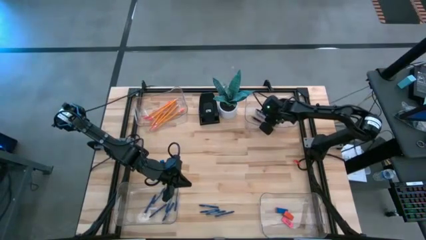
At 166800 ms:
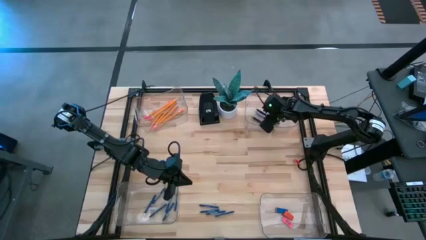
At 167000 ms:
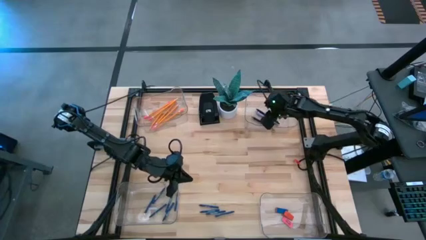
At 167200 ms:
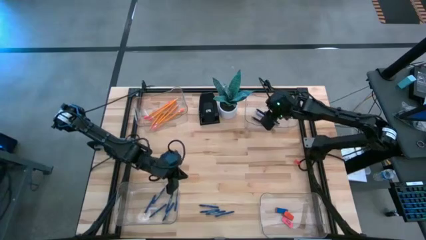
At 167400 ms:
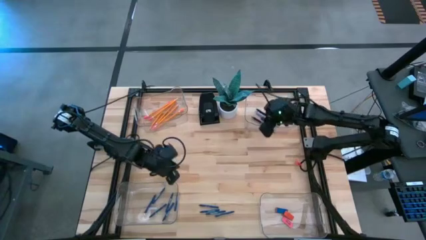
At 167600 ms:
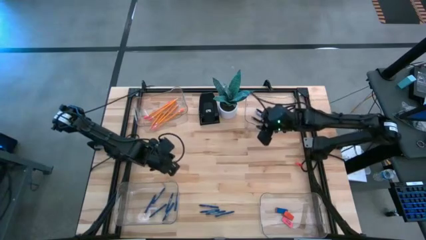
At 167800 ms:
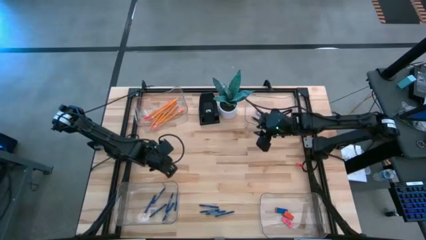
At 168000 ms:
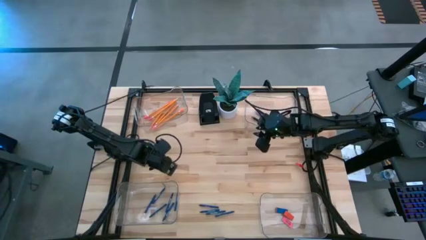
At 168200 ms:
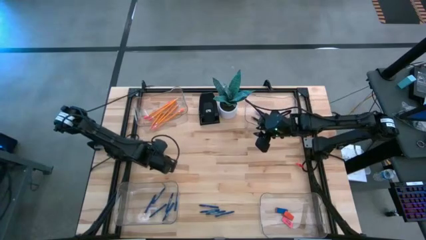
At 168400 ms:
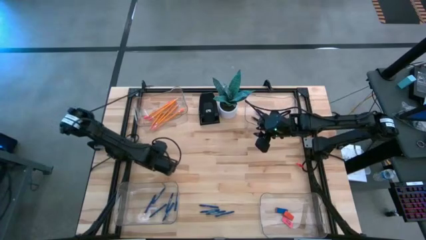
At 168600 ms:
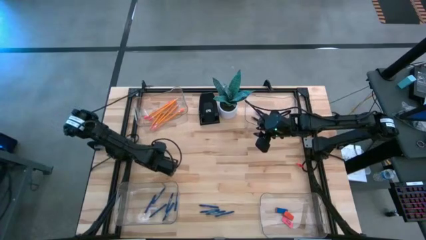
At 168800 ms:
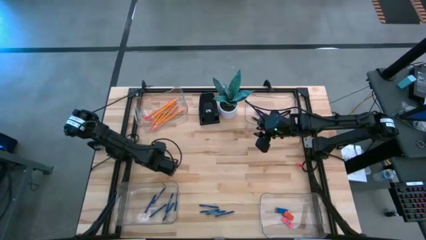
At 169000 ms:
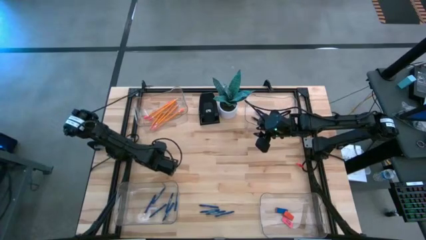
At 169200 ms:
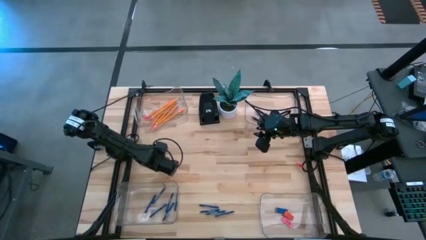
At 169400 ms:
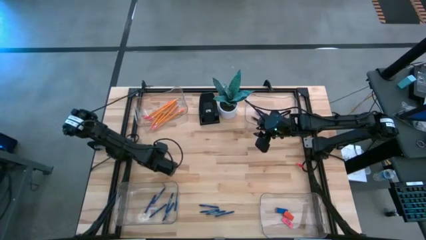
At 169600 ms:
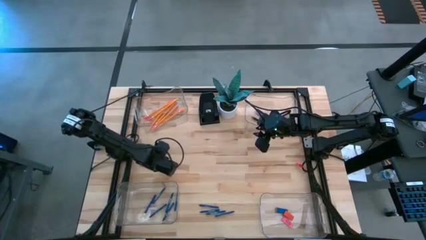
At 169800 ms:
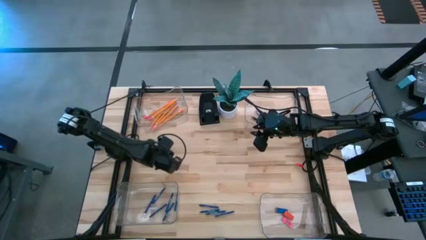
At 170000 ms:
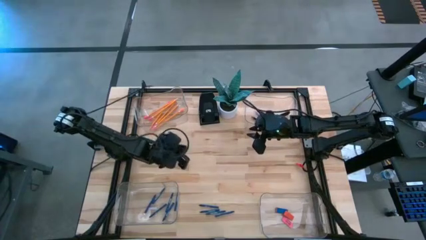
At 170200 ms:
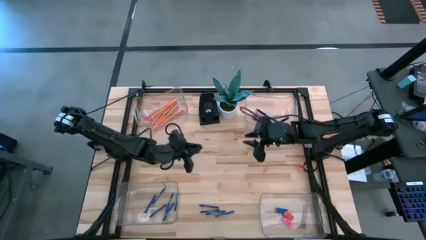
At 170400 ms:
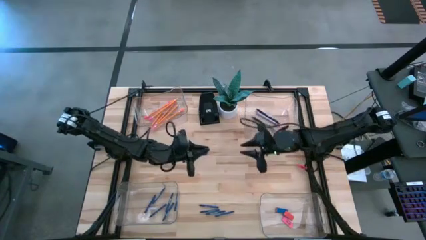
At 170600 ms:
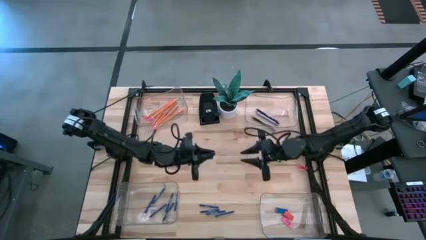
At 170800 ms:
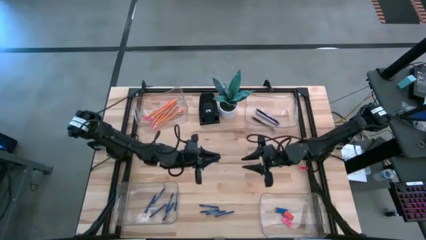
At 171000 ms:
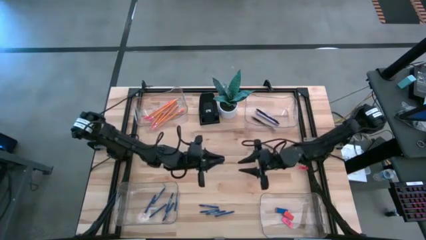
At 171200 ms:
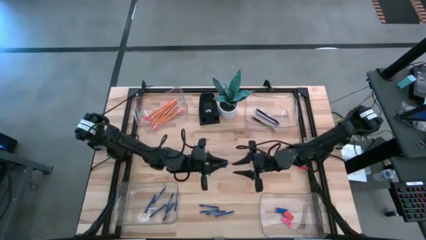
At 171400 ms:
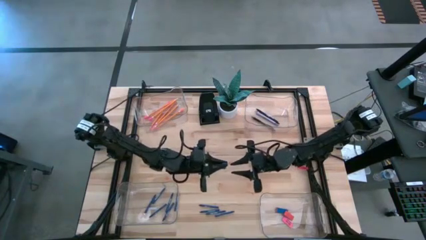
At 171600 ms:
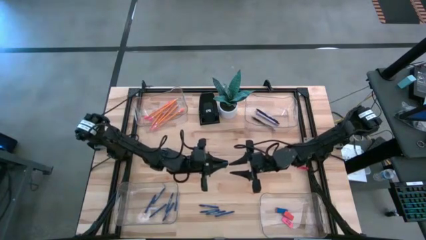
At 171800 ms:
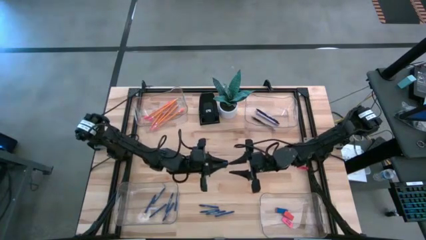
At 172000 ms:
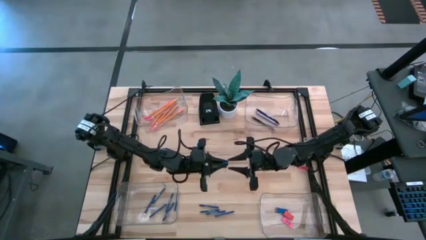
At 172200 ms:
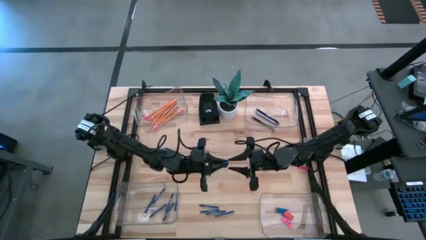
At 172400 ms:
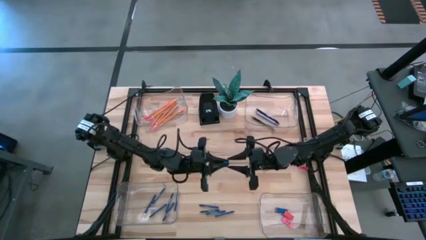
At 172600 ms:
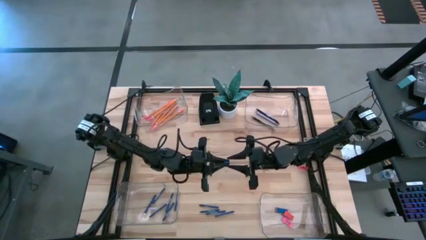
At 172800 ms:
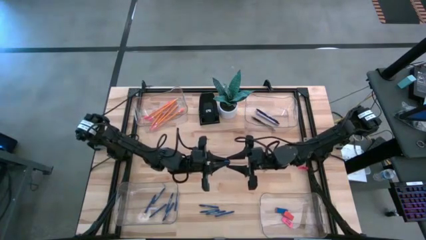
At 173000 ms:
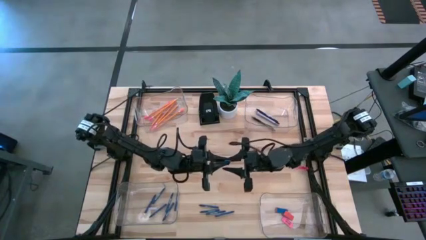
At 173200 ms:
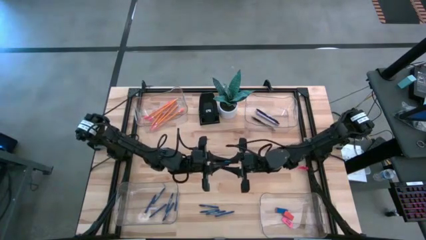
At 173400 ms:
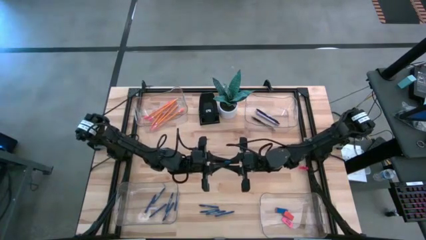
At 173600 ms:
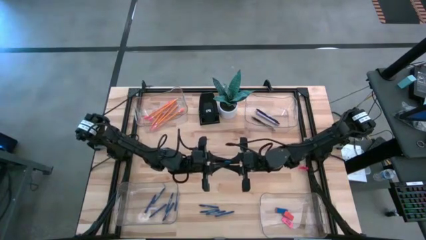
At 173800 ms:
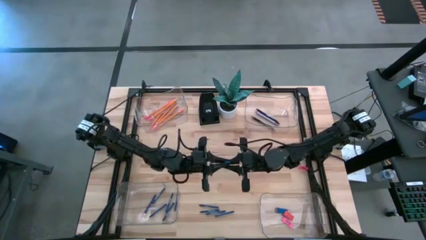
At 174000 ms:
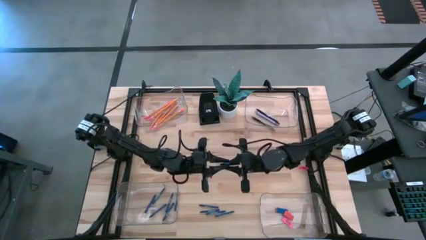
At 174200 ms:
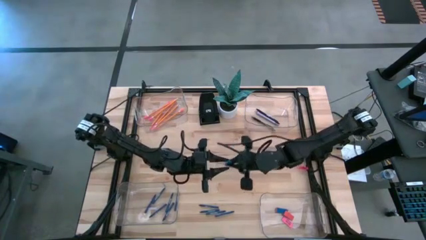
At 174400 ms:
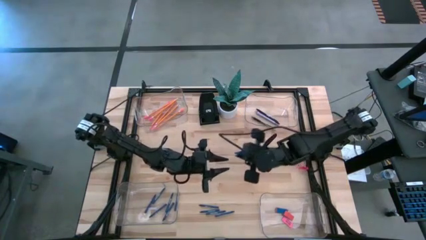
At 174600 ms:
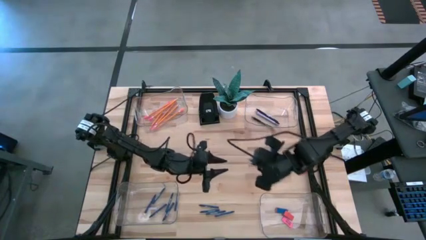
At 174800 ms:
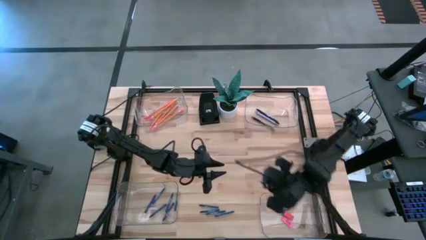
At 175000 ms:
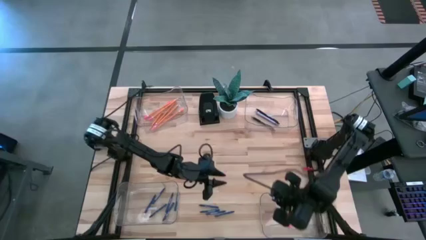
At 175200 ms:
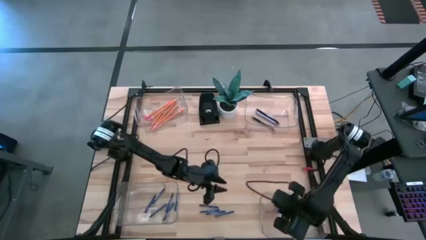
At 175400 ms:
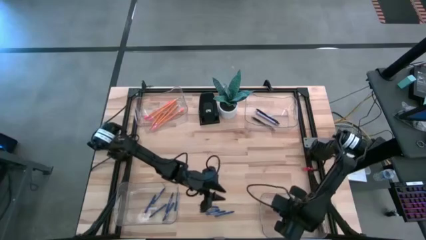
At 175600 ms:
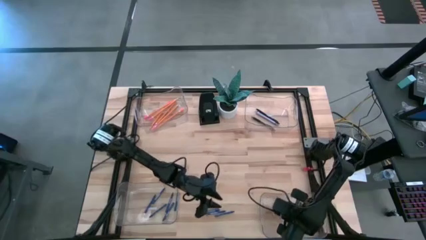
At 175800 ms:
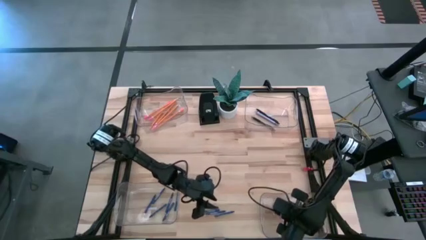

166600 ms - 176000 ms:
Task: Sort crayons/erasers/pens/pencils in bins
Put the blue eraser into the bottom right transparent bin

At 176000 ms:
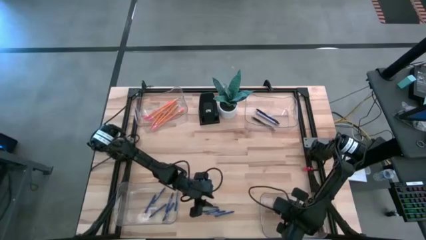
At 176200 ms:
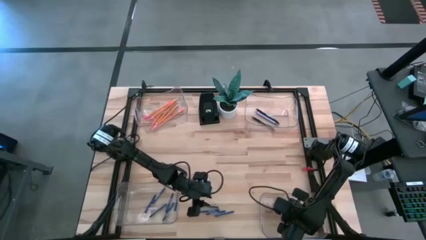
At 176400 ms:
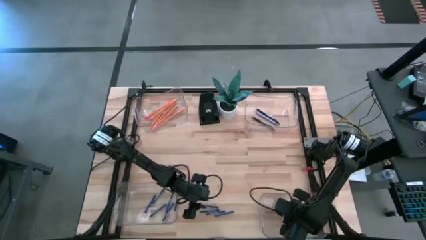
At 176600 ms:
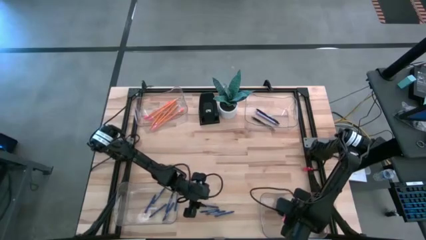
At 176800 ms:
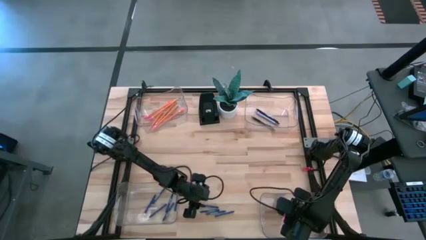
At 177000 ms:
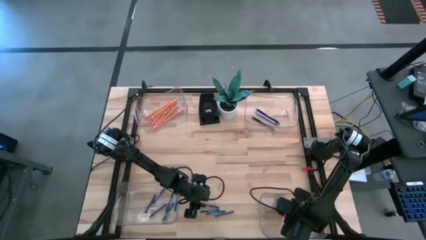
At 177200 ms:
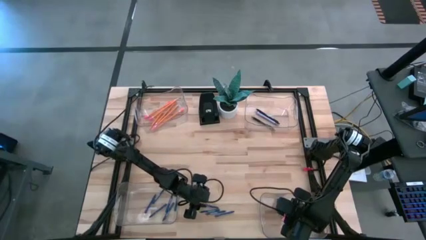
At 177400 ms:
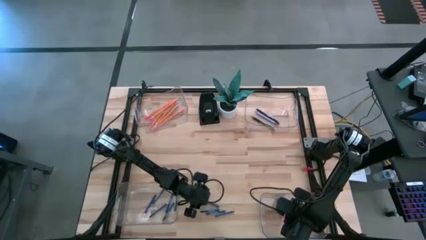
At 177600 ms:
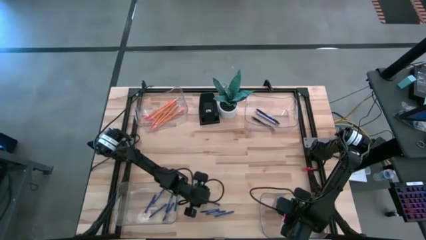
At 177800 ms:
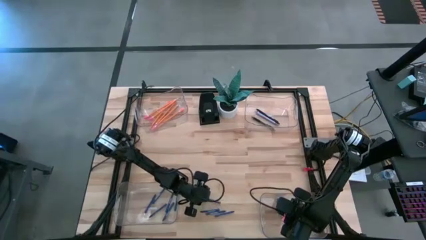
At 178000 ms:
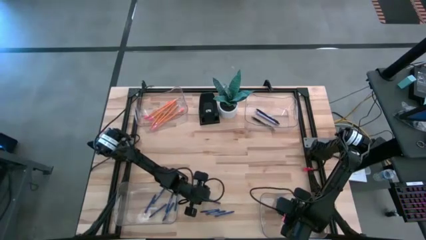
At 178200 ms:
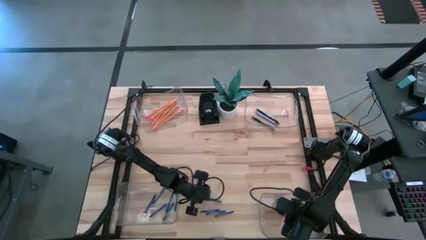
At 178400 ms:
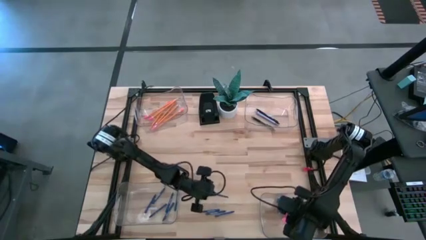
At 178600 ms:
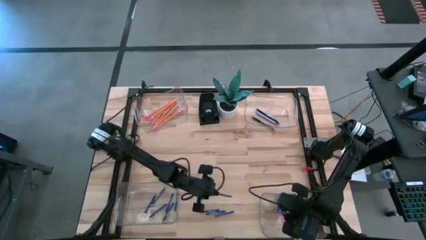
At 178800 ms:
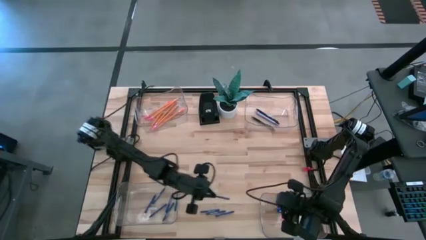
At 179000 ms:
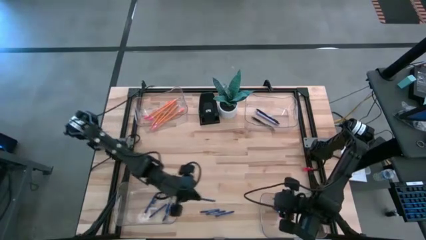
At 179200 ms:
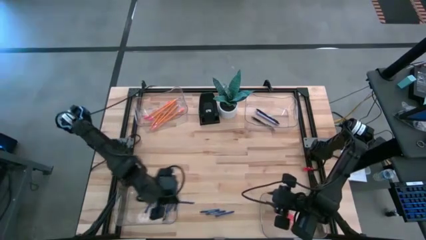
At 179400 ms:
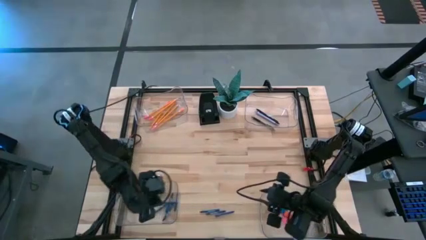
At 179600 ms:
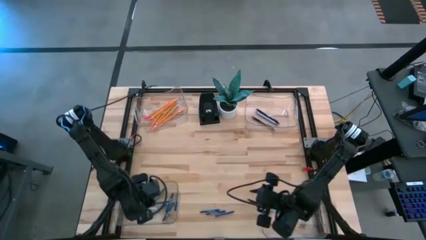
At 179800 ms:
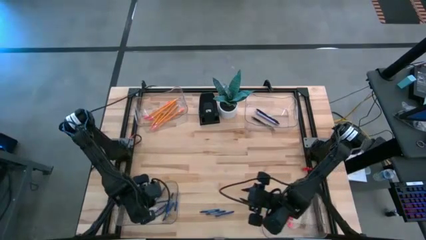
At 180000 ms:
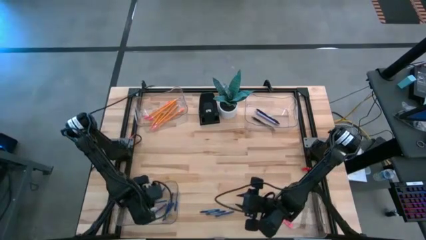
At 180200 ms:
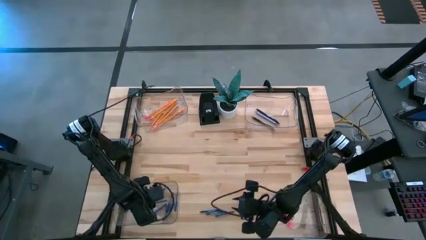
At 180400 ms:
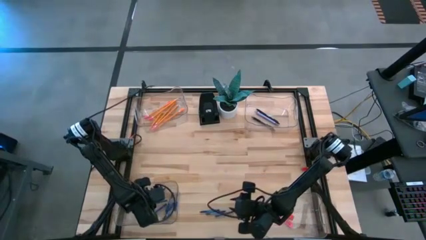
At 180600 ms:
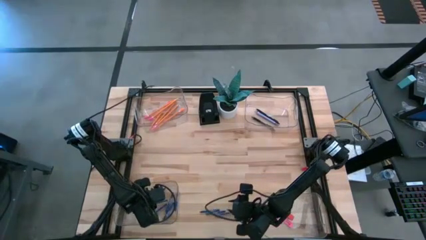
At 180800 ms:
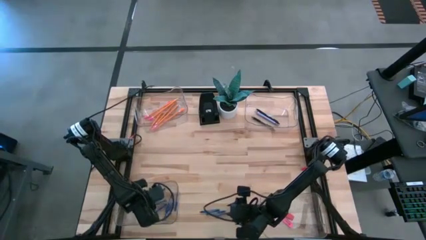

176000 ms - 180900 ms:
Put the blue crayon into the bottom left transparent bin
